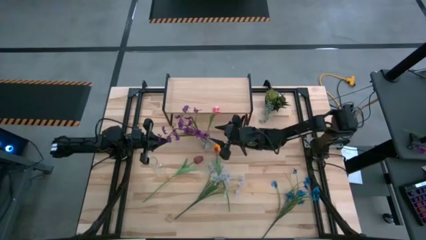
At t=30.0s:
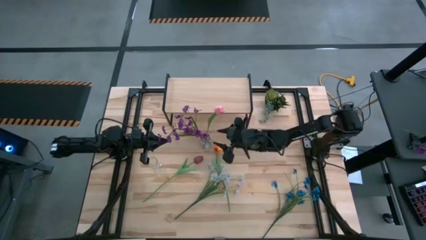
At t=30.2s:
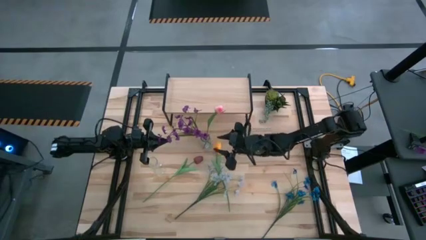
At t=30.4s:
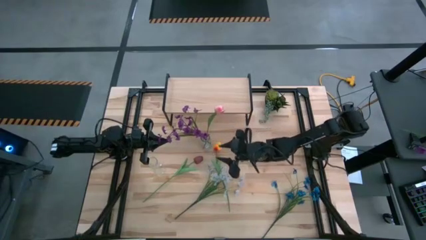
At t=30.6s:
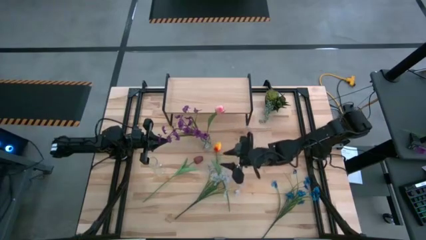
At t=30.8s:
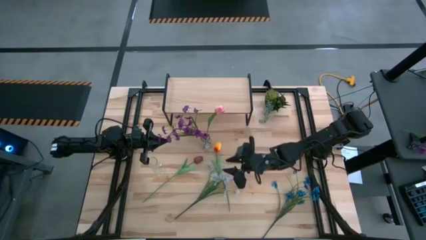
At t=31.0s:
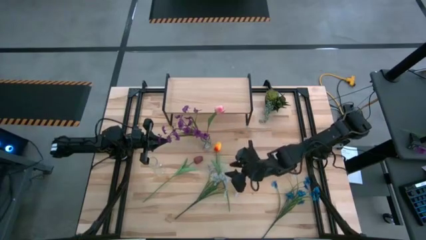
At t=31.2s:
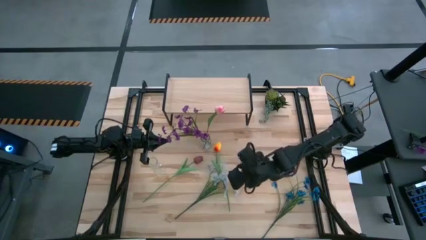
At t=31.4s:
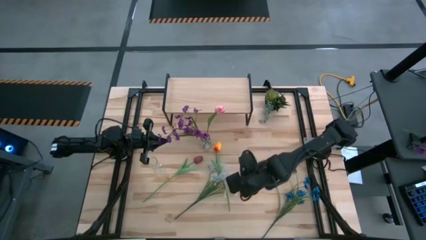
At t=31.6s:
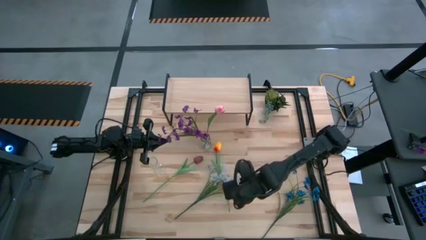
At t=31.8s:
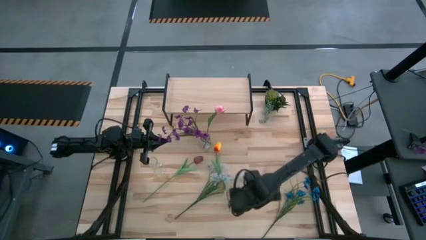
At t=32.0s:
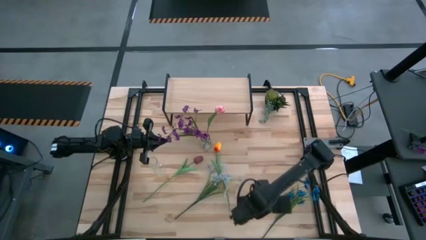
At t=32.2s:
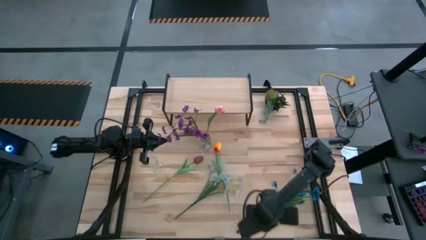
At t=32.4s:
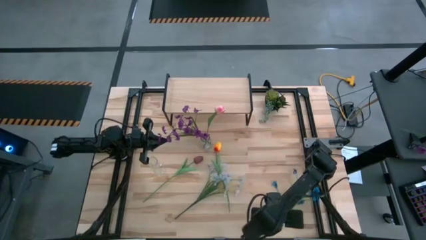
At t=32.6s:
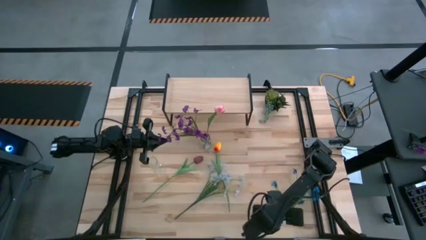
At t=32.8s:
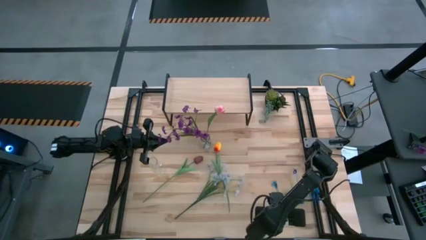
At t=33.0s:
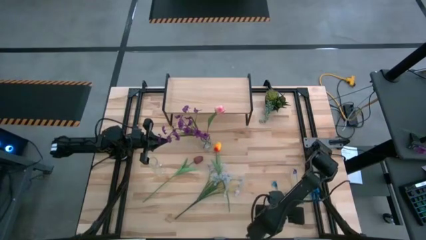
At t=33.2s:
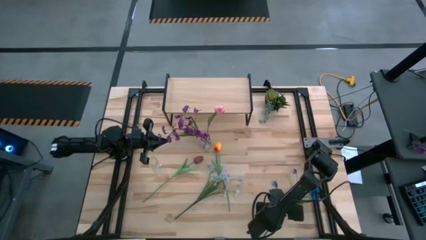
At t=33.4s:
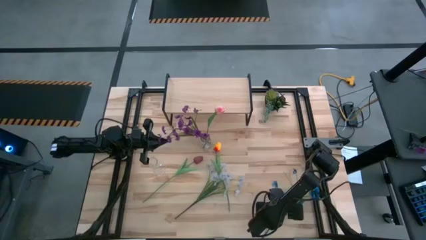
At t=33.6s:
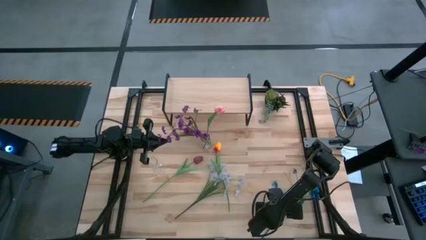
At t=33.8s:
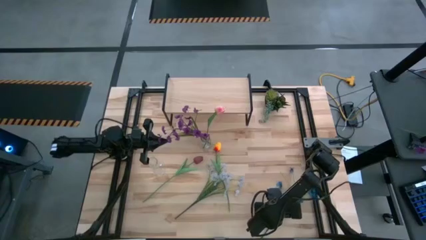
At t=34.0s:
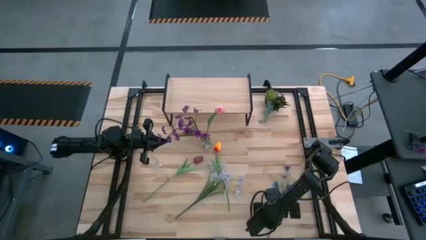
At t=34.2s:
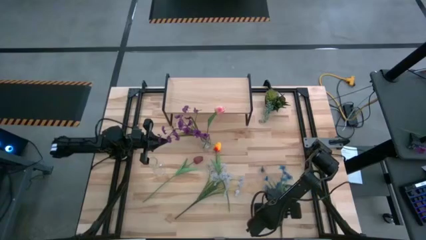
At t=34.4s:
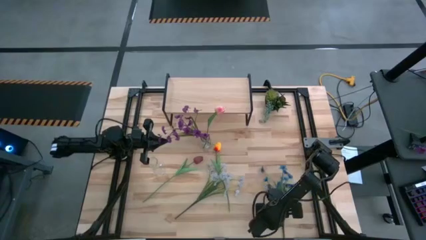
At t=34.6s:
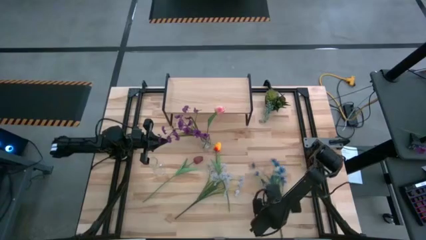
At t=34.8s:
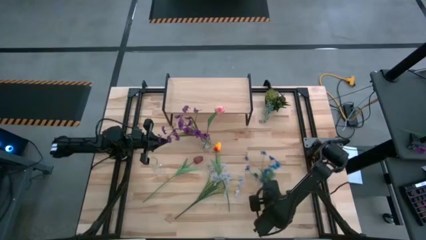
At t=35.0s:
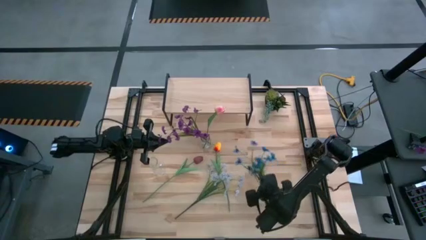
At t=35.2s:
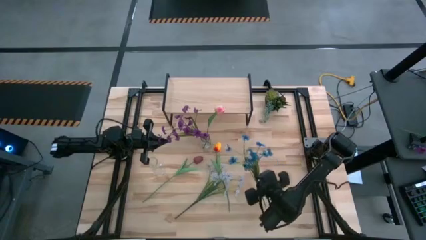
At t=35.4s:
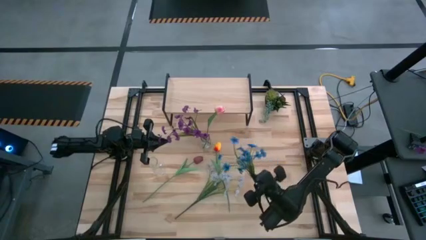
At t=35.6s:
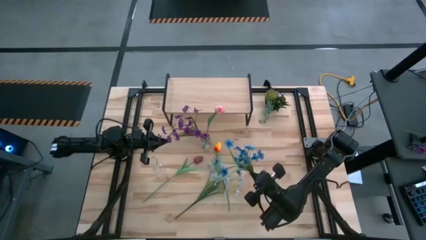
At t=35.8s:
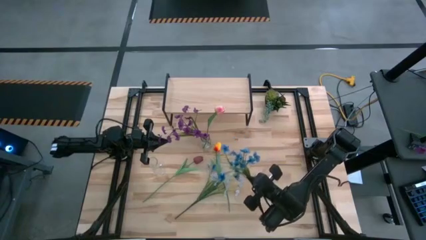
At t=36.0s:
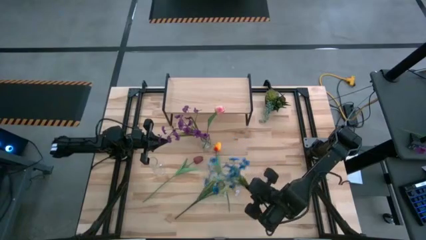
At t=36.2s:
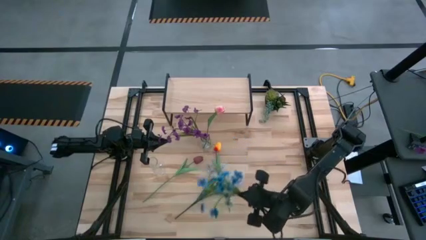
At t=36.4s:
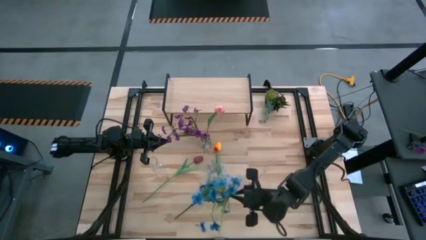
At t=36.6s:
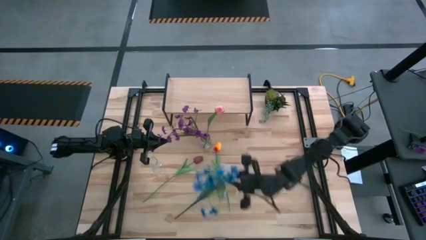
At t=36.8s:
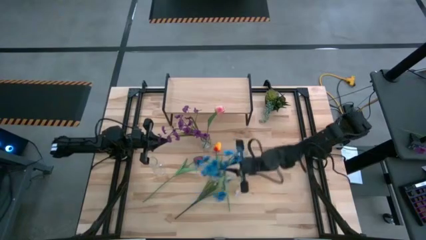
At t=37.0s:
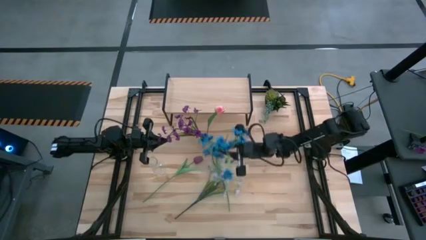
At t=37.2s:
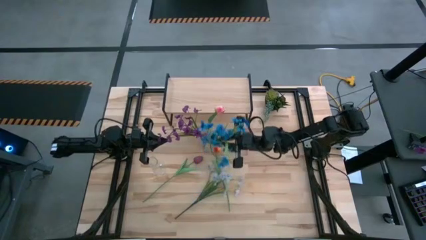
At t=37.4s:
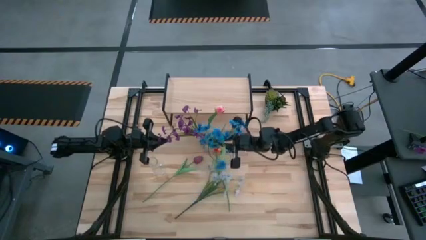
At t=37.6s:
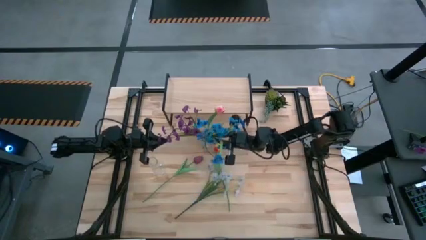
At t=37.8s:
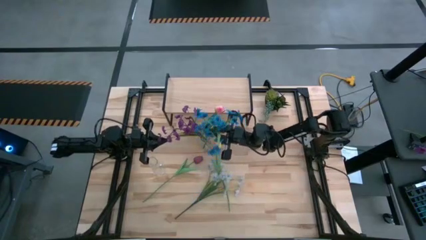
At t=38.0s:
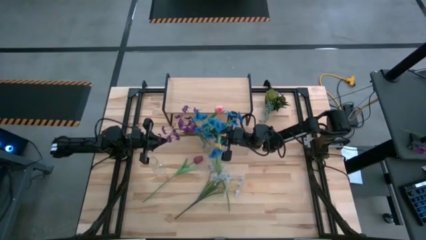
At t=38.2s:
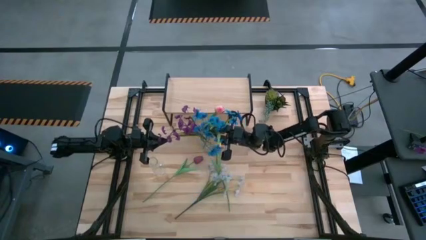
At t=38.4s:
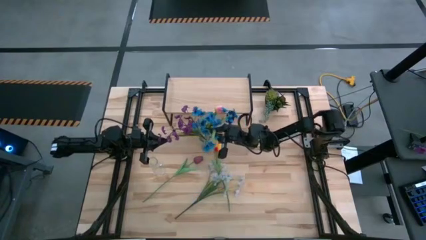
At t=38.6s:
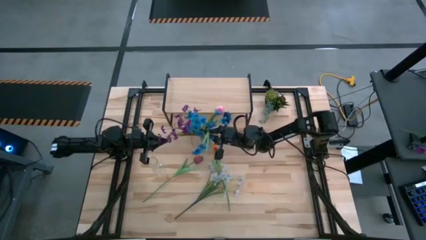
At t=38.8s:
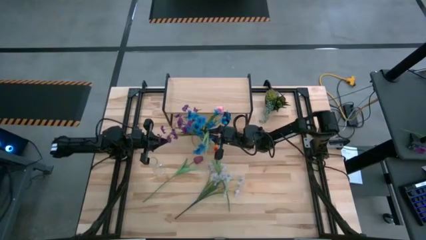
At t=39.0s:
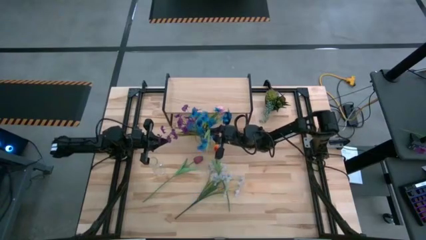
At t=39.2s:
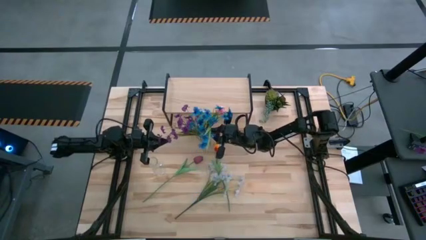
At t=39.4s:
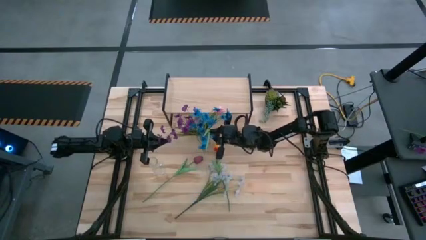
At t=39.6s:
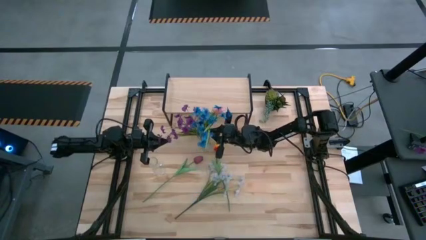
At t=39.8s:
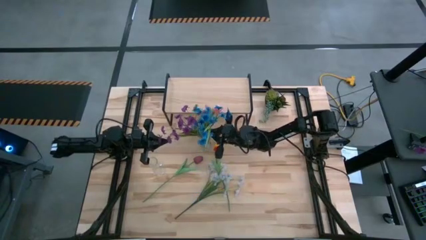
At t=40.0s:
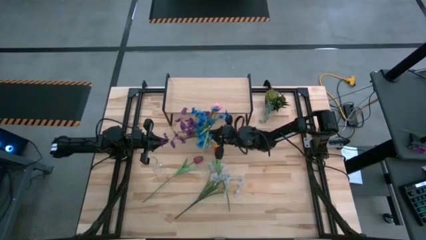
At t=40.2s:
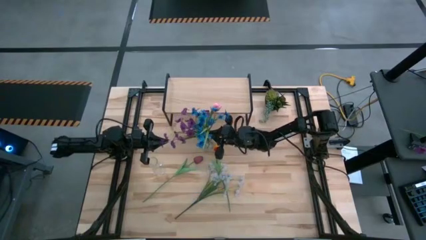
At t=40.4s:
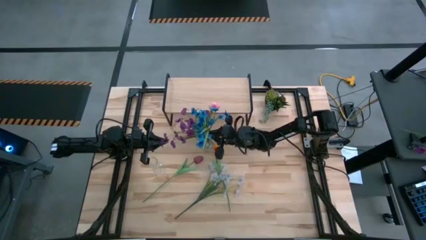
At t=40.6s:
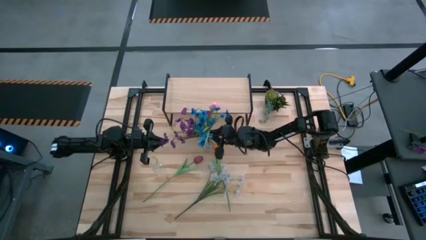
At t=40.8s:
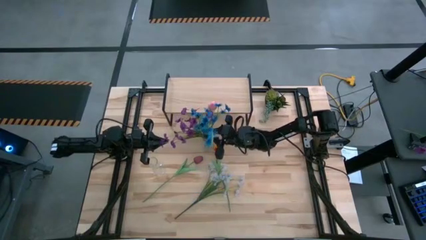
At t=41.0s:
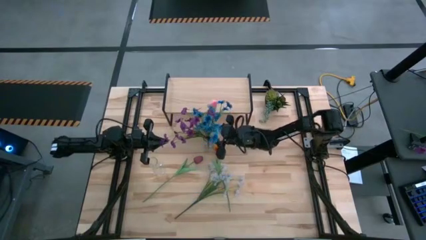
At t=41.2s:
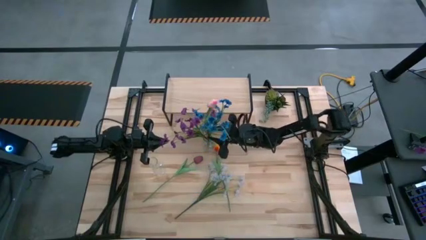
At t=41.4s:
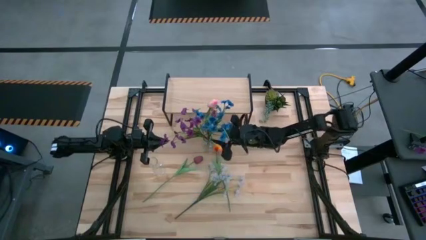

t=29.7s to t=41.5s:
Task: Pick and place flowers into a vace then onto a shelf
Put the blue flowers into the right transparent vase

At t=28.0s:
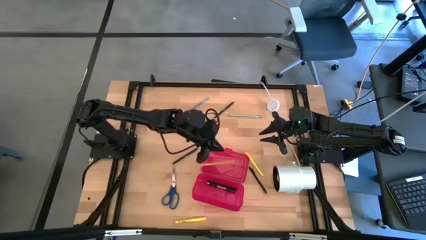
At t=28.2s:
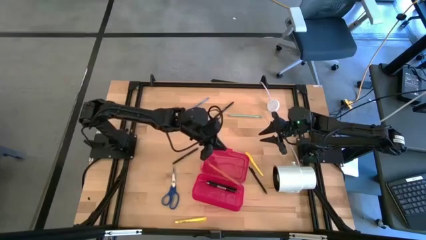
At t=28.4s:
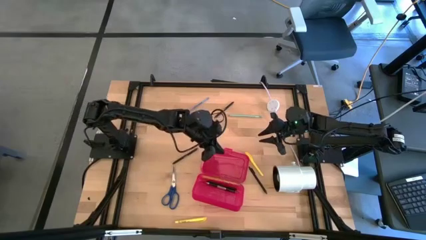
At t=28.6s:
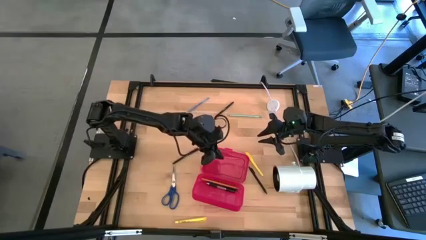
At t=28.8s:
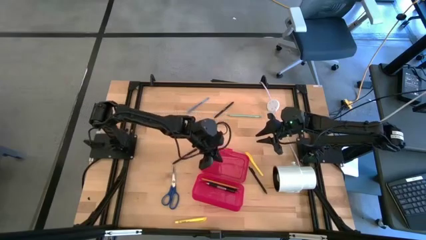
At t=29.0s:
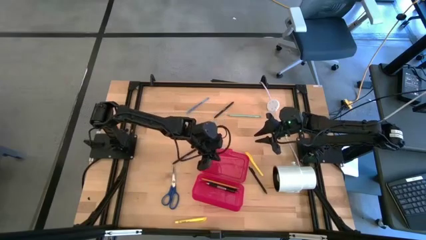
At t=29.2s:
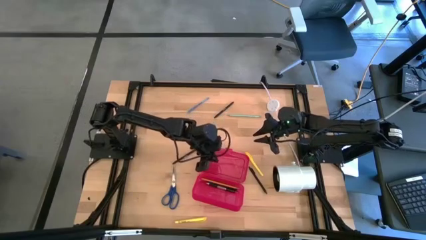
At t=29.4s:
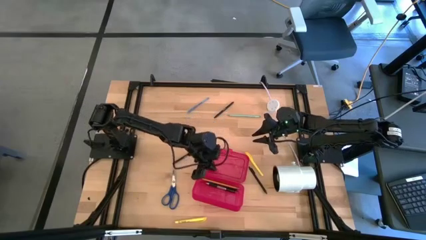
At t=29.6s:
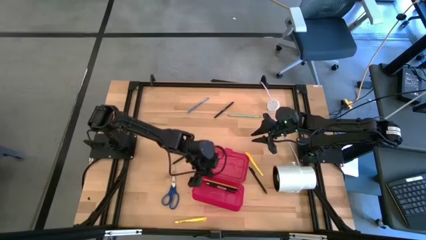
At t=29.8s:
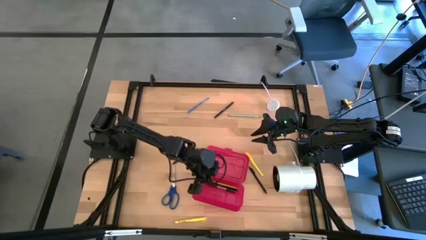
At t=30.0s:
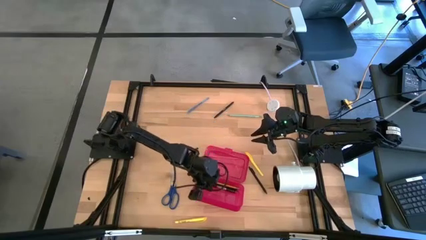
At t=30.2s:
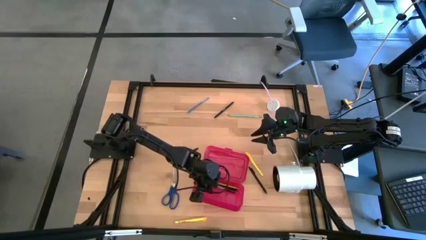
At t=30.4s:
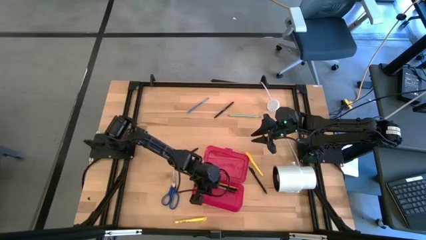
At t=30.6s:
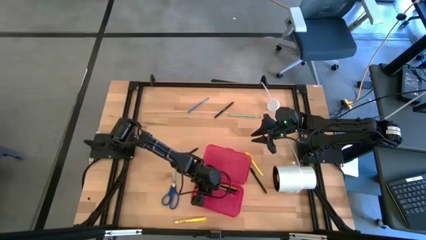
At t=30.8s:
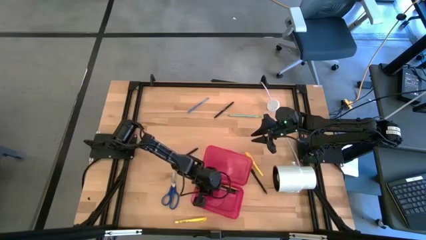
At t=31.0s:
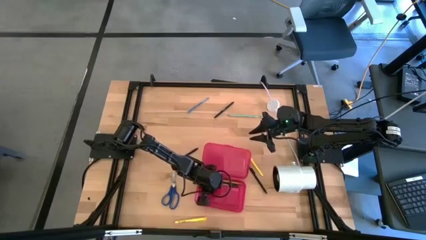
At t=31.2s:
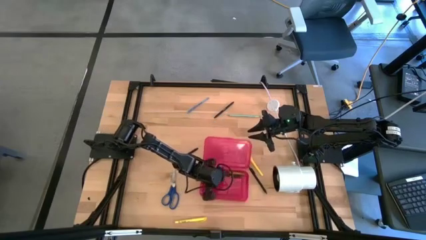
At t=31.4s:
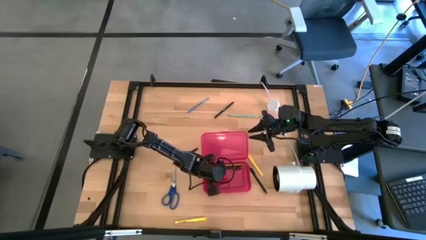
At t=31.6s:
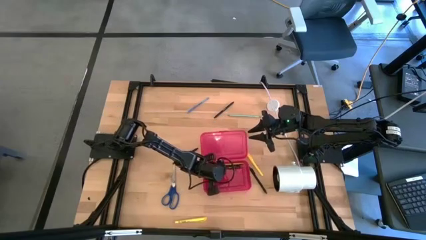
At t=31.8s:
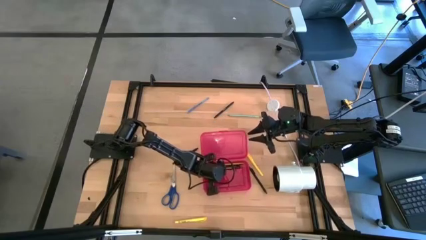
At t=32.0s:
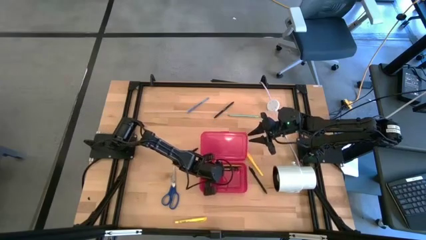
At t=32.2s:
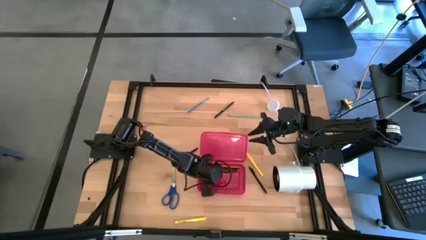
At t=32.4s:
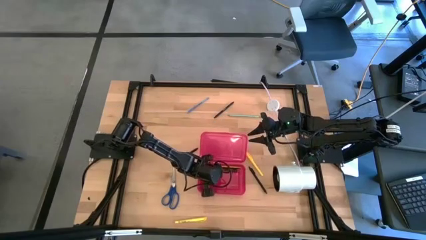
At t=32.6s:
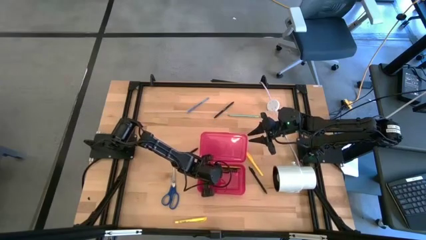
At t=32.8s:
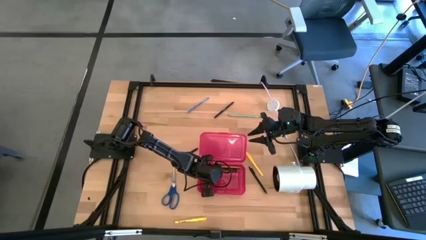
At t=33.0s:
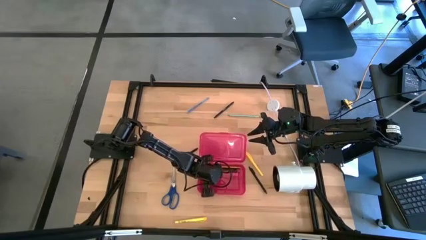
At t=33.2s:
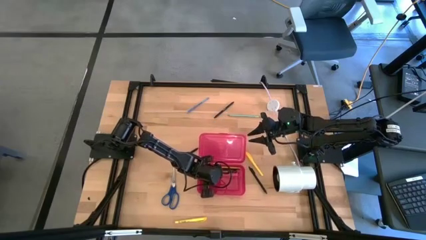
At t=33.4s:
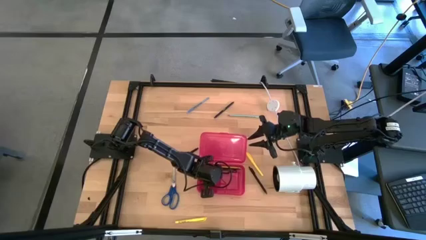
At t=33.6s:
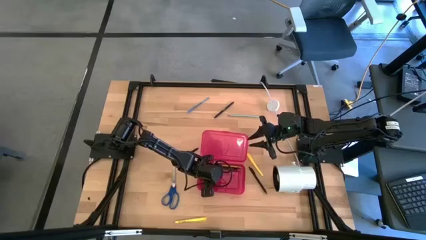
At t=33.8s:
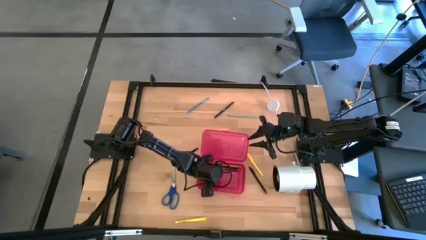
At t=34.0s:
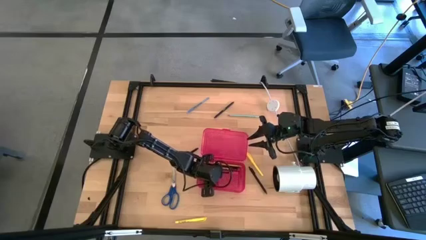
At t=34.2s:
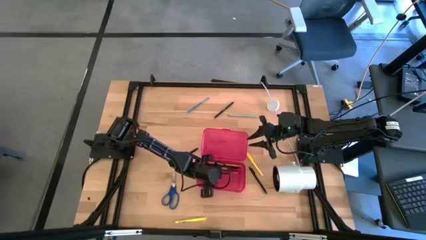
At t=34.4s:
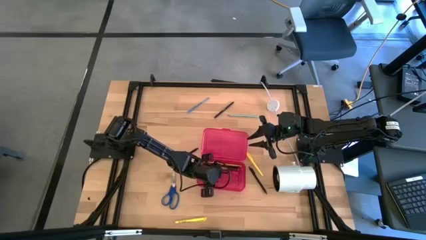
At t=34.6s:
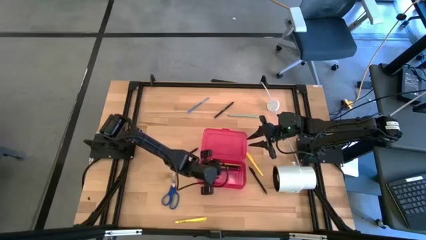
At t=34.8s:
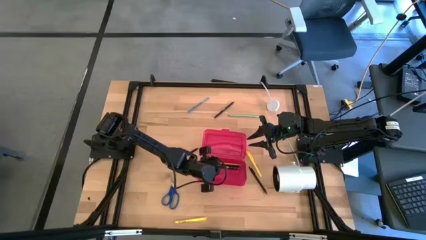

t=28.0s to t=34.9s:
Task: Pick & place school supplies into a supply box
Move the red supply box to the centre of the table
